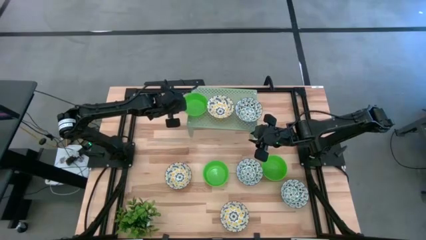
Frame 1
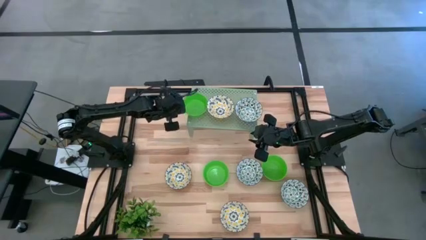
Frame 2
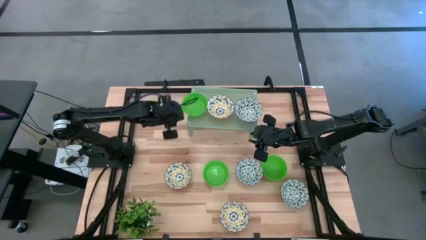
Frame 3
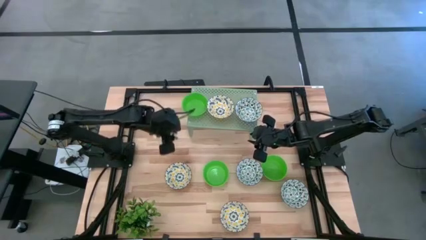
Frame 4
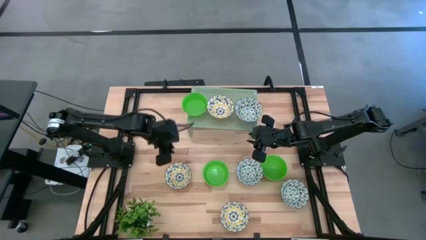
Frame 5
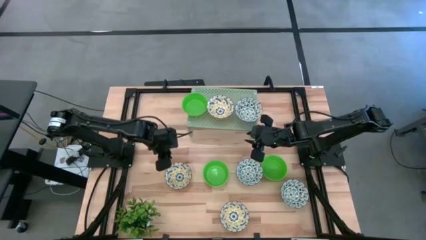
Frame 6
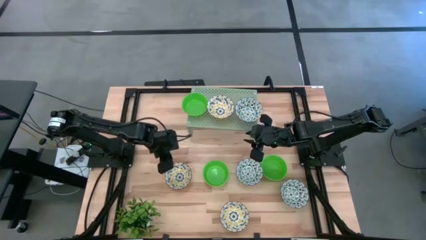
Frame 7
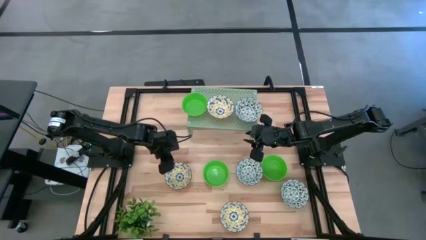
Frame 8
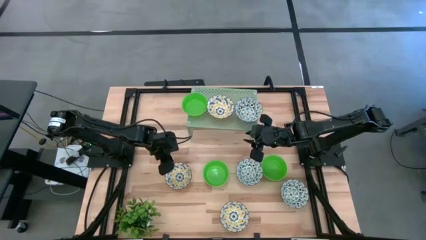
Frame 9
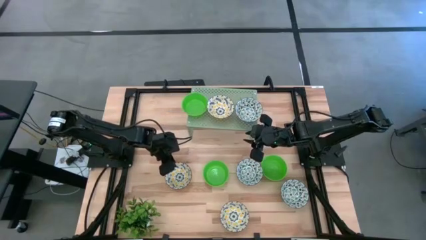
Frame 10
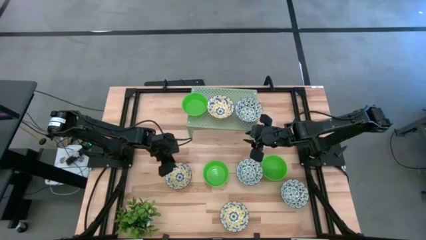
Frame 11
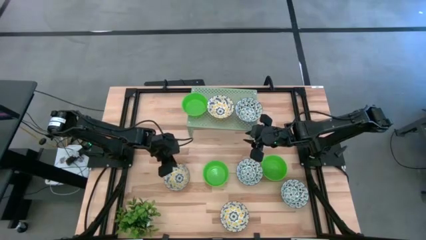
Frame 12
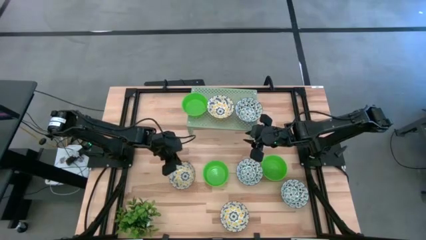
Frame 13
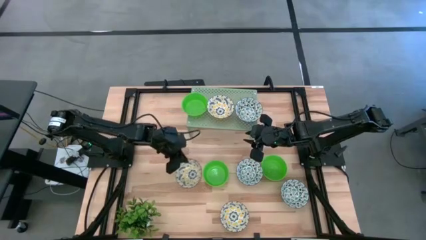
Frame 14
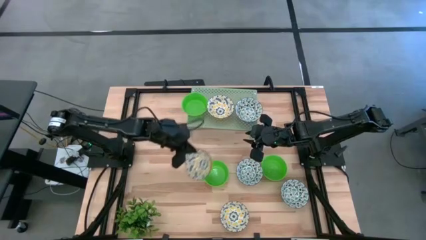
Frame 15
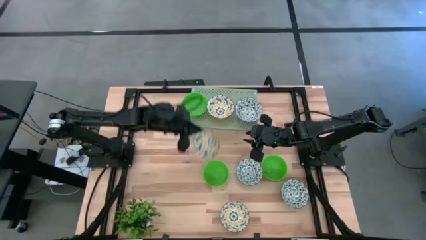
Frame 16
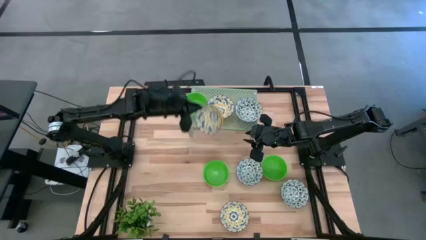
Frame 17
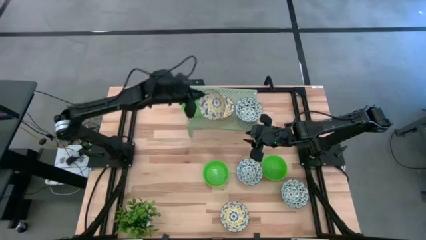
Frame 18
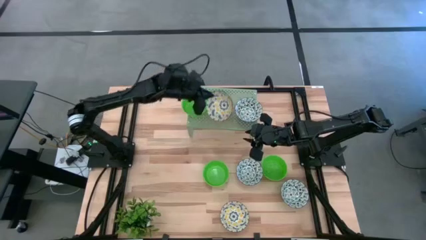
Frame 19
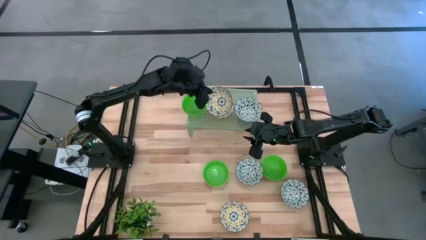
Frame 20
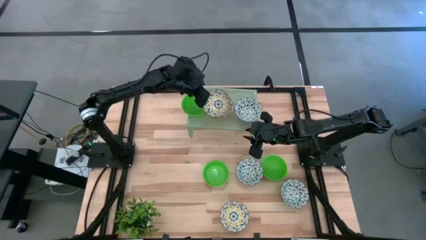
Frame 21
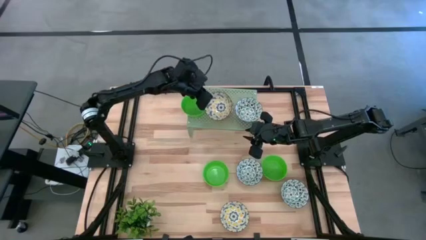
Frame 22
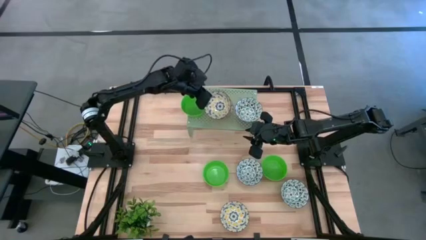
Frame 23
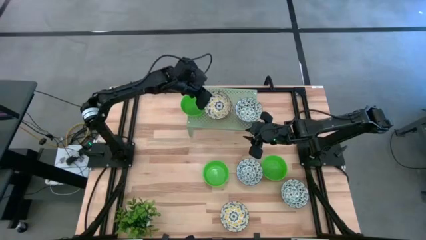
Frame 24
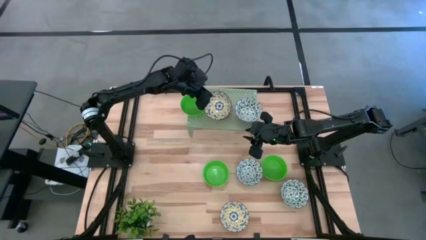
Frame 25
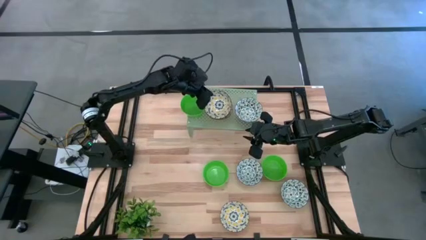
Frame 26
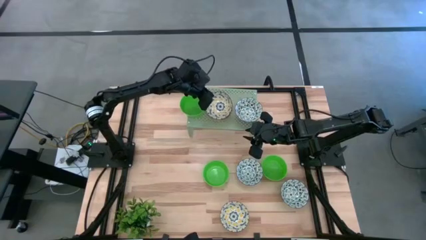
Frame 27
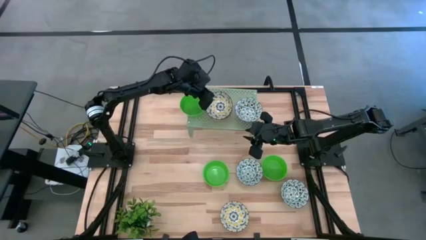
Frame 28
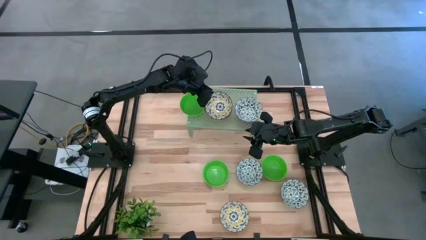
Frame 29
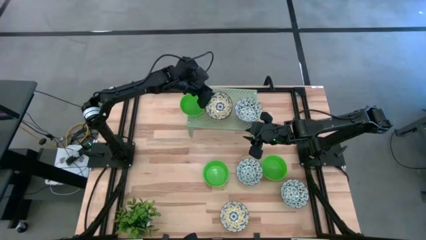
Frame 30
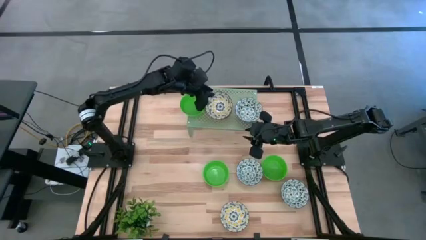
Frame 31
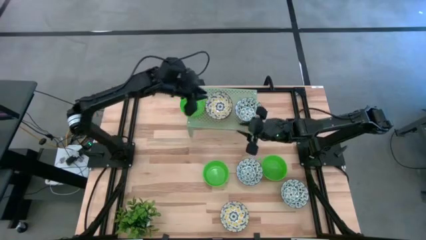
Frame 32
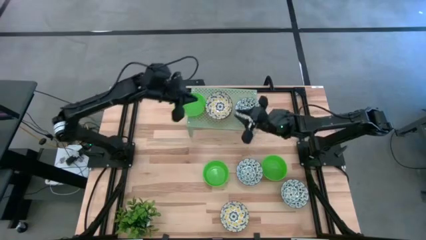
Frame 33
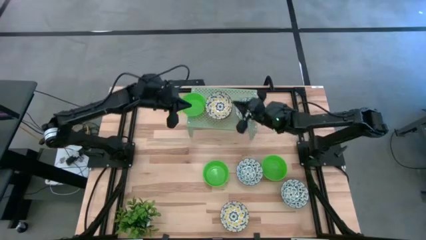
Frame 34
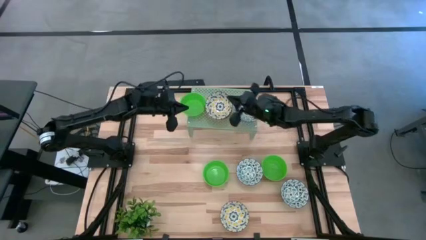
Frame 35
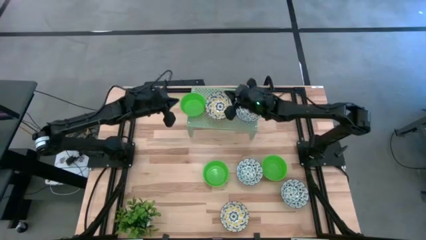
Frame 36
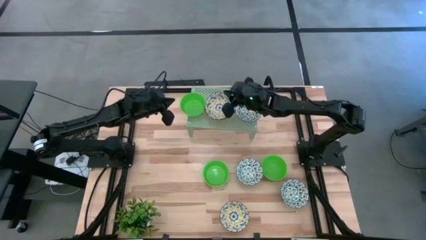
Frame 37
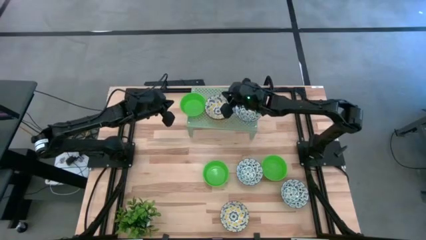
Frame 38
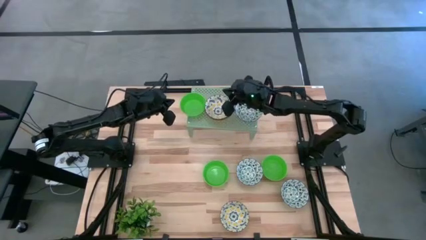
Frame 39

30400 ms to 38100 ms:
Task: Pick & Place Mini bowls
Stack the left yellow bowl on the yellow bowl on the shelf

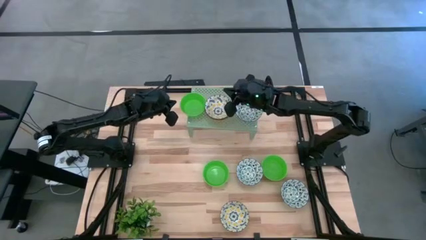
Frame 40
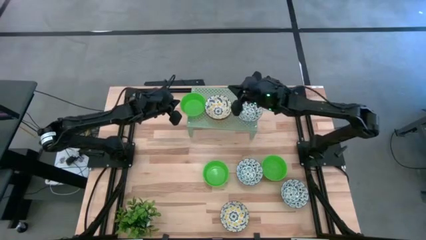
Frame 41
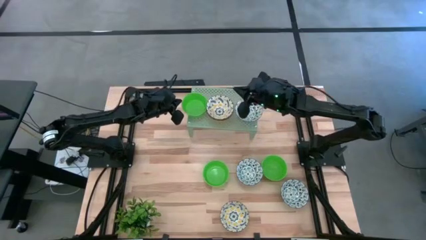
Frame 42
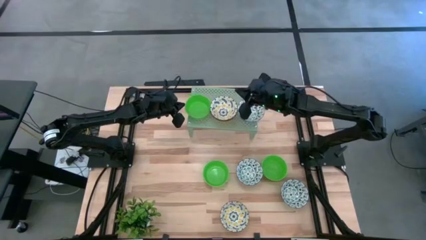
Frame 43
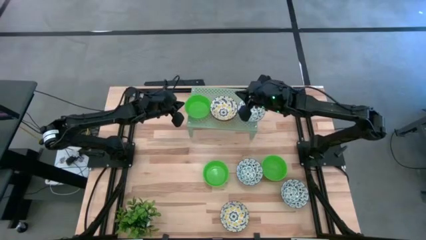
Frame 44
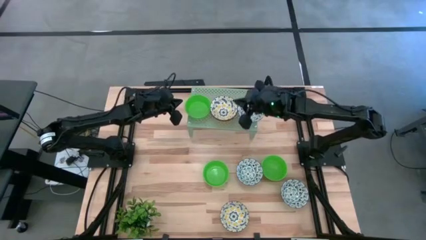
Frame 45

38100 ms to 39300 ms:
Adjust the green bowl on the shelf

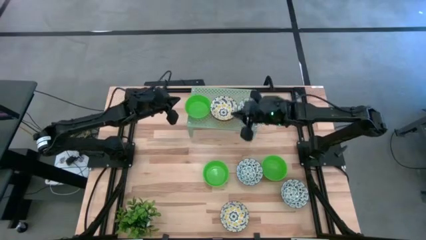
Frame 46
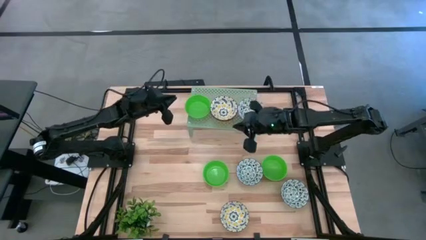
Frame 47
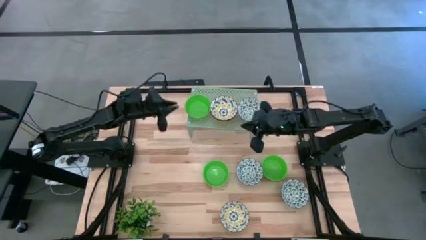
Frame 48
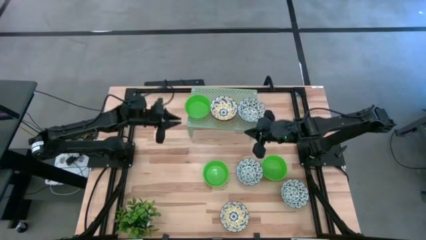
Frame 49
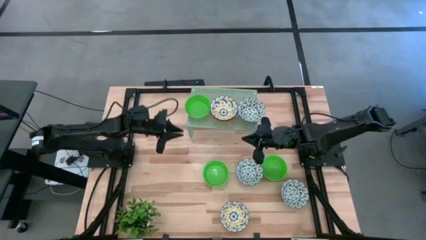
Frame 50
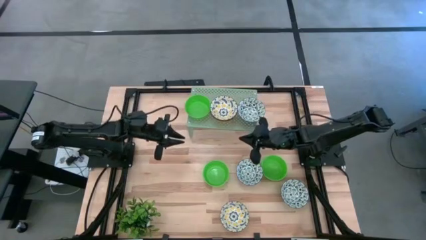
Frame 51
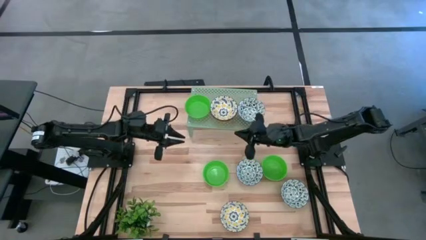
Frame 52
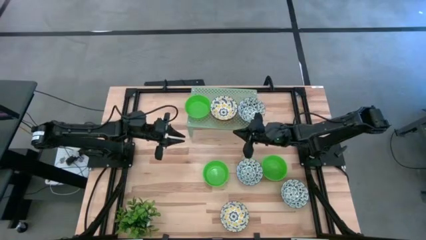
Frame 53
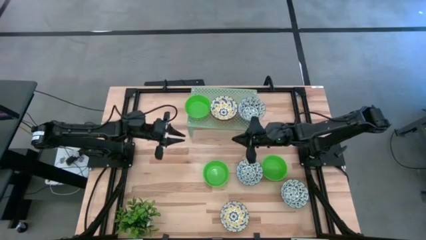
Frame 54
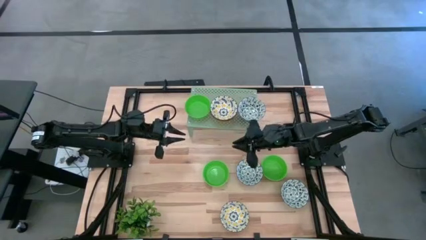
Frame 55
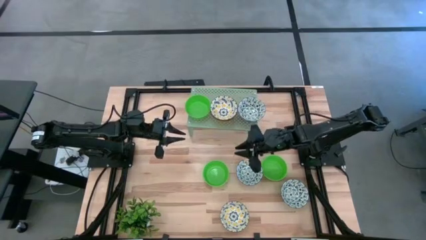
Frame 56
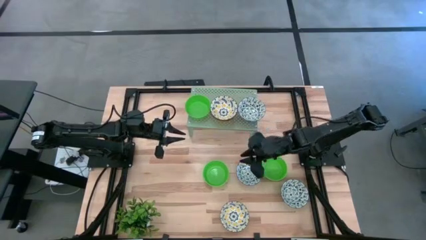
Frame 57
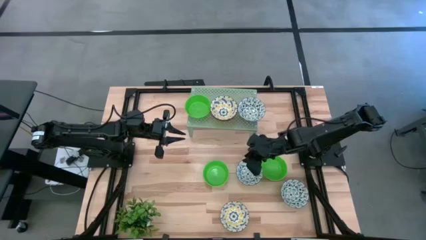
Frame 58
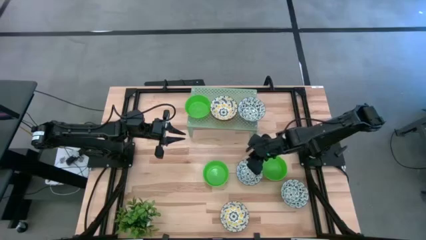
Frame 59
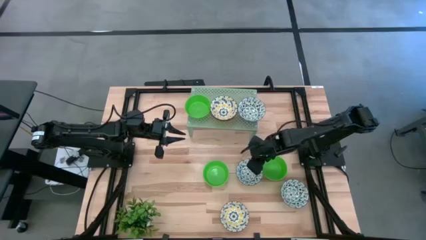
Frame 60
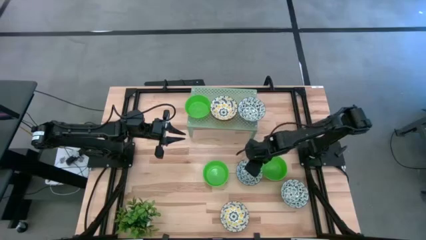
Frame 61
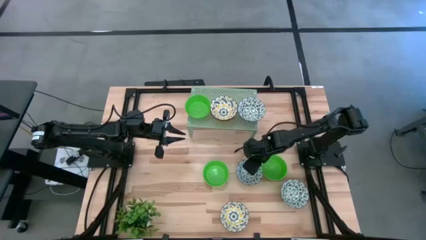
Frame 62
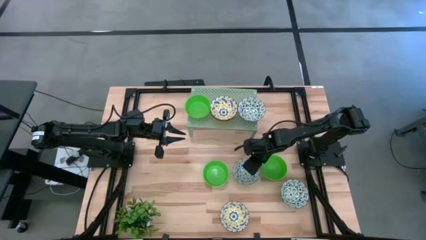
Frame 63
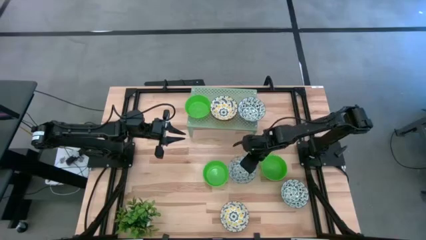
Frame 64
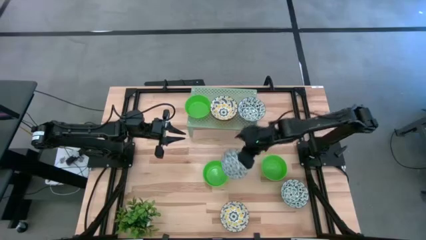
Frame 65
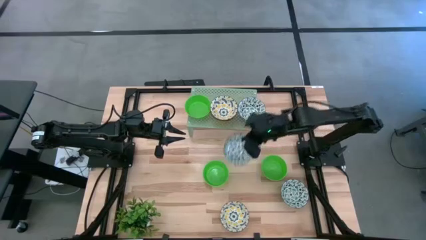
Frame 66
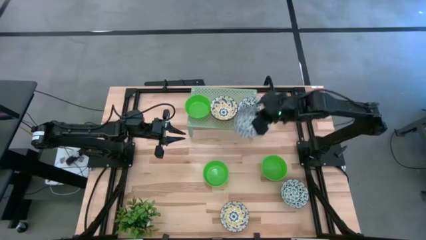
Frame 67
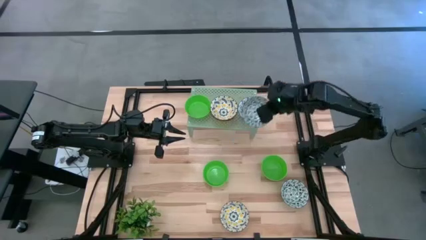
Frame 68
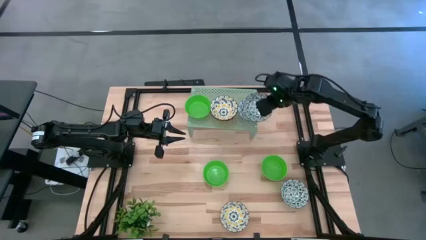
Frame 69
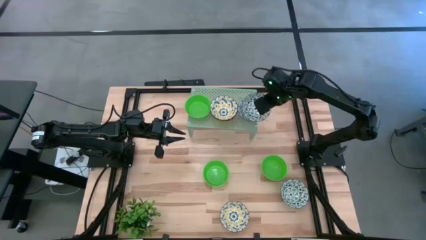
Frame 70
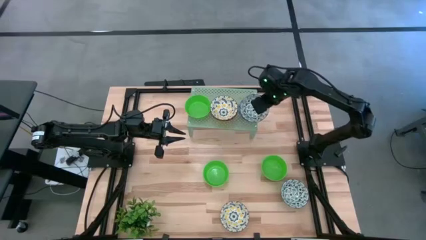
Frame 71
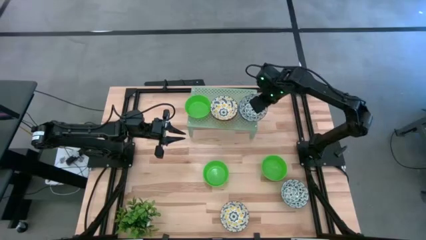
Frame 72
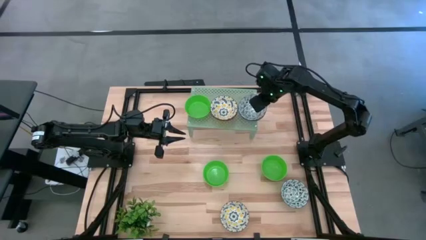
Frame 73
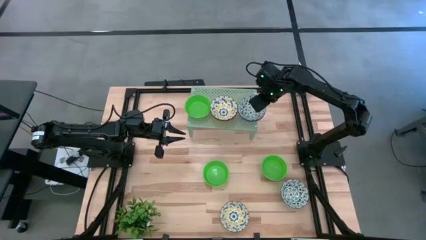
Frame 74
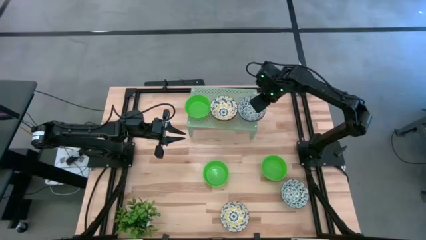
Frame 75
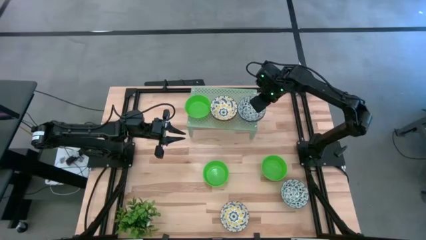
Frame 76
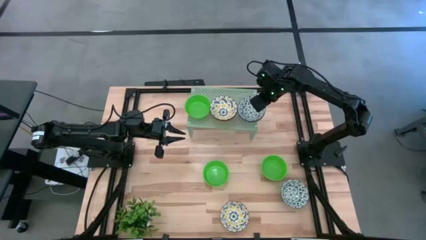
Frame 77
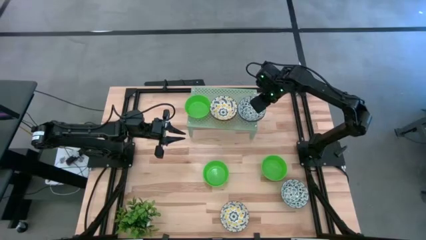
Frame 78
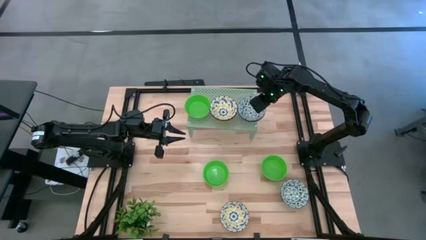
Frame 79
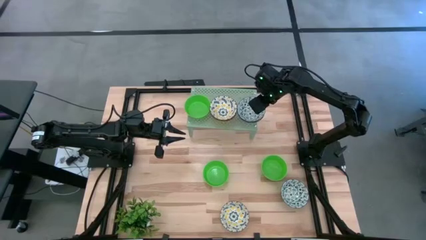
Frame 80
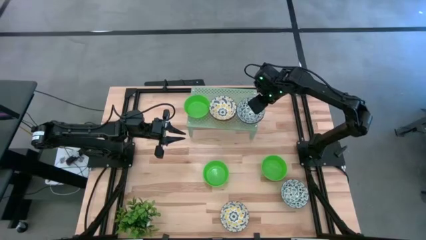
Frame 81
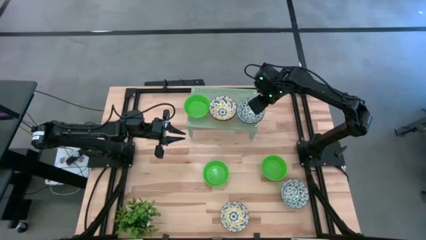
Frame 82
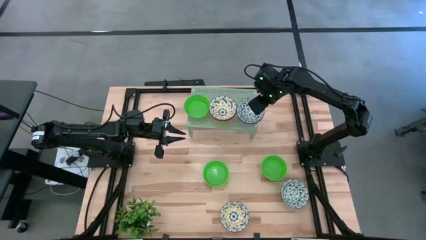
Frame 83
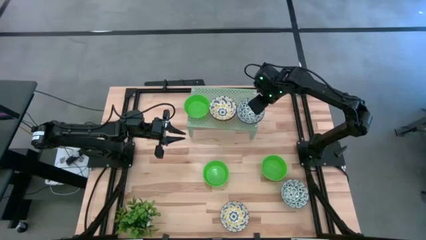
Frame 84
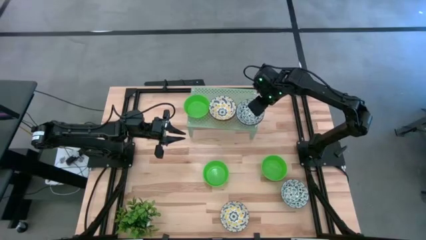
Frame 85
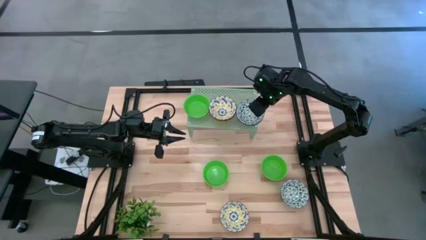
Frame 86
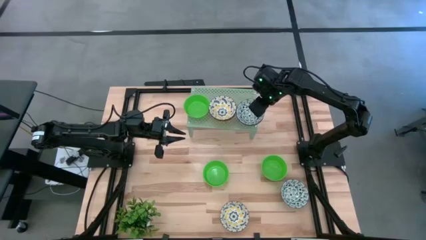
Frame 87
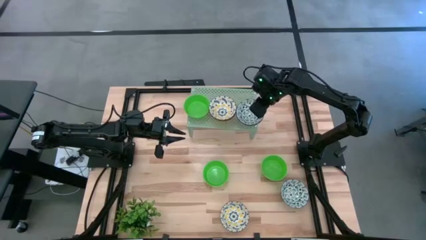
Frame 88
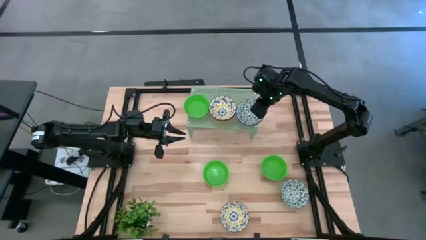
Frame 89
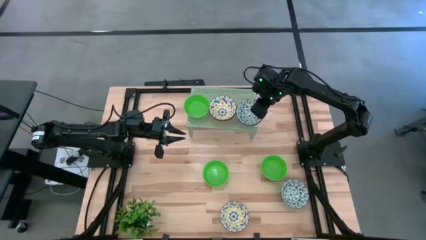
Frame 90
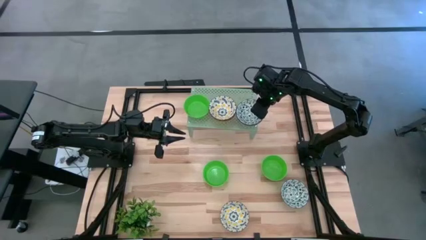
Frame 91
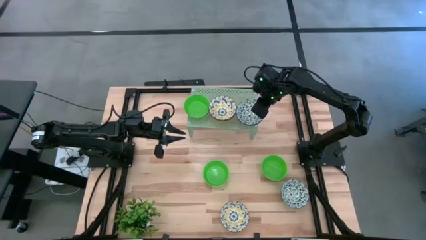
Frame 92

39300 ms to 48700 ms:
Stack the left blue bowl on the blue bowl on the shelf
